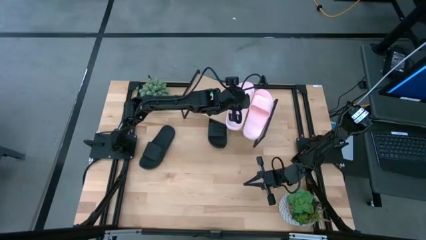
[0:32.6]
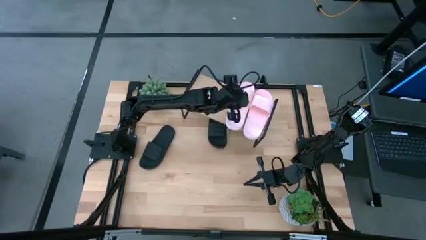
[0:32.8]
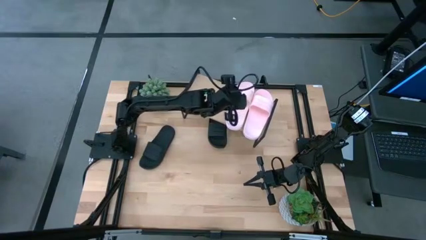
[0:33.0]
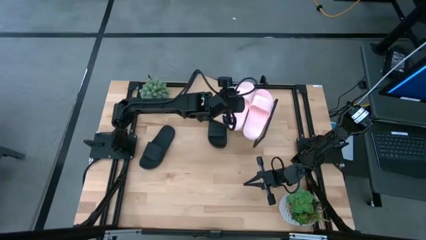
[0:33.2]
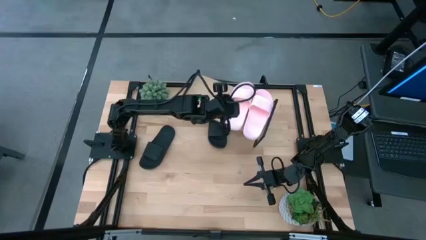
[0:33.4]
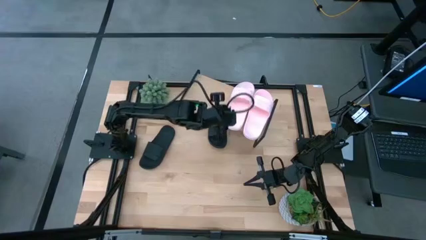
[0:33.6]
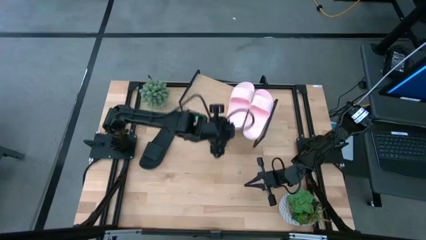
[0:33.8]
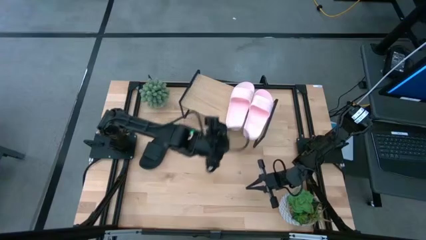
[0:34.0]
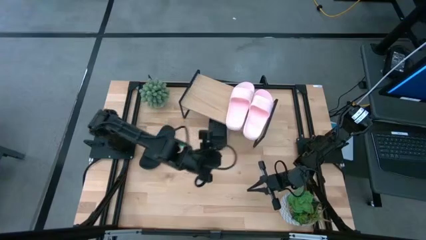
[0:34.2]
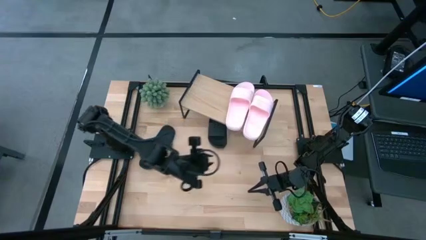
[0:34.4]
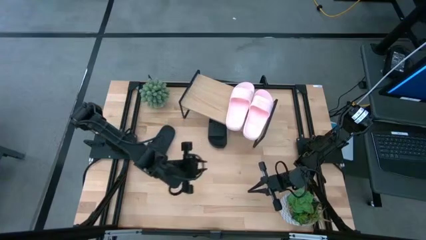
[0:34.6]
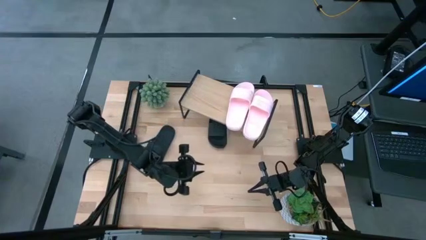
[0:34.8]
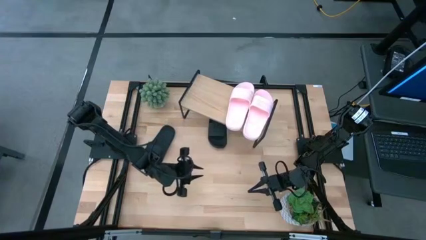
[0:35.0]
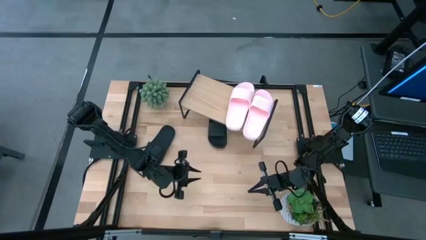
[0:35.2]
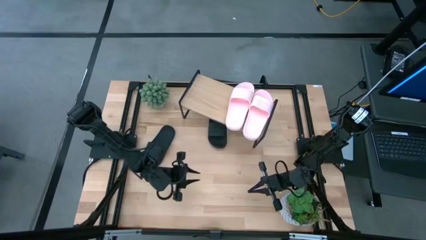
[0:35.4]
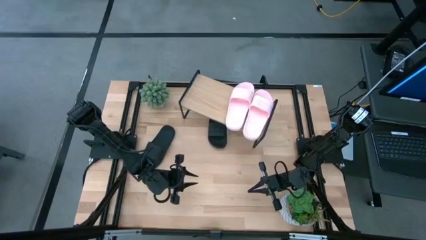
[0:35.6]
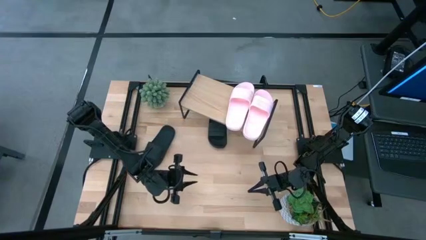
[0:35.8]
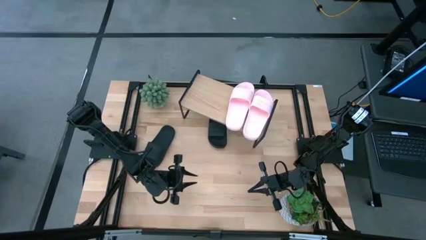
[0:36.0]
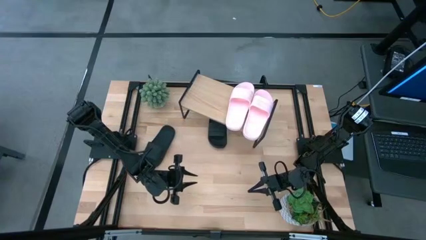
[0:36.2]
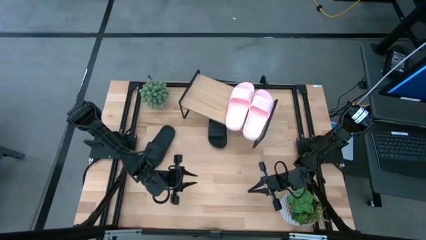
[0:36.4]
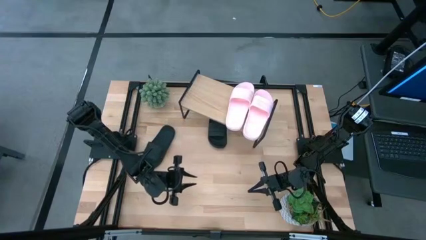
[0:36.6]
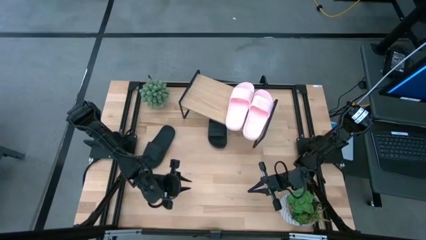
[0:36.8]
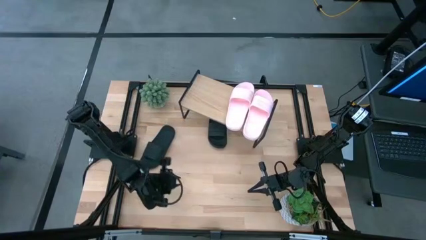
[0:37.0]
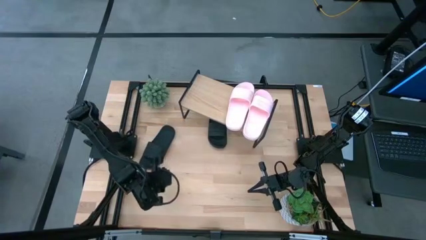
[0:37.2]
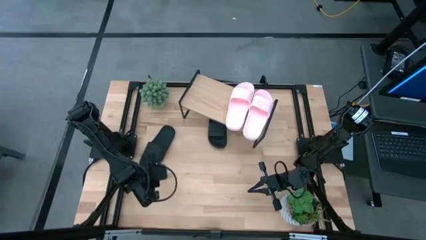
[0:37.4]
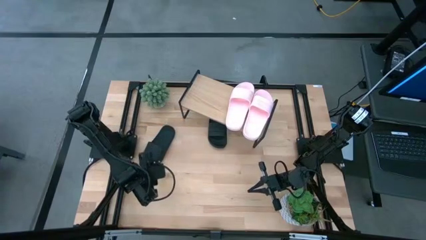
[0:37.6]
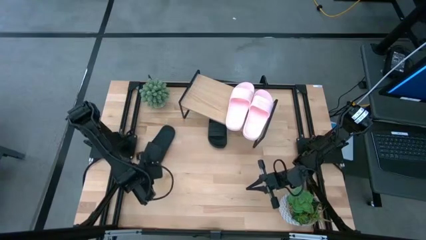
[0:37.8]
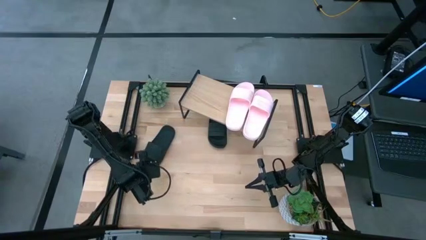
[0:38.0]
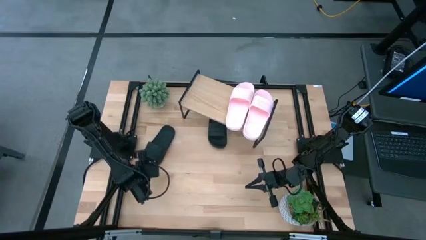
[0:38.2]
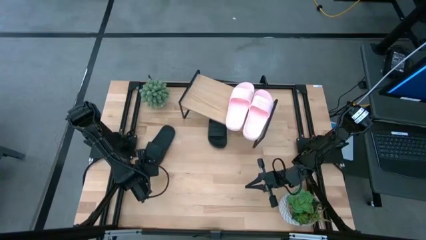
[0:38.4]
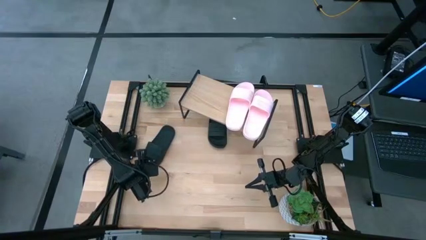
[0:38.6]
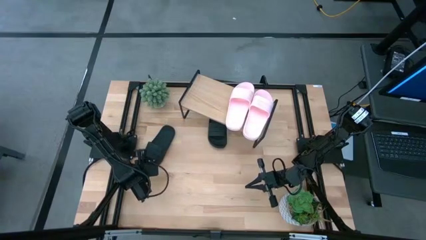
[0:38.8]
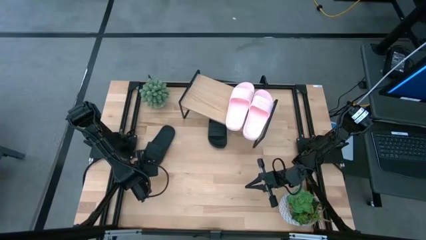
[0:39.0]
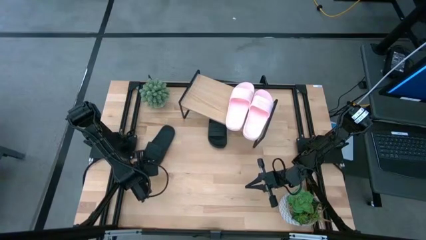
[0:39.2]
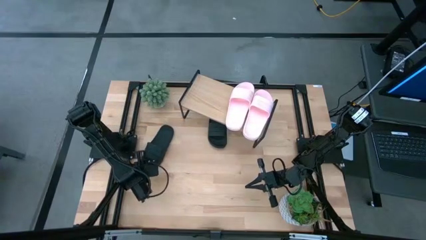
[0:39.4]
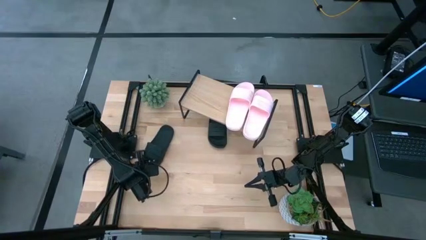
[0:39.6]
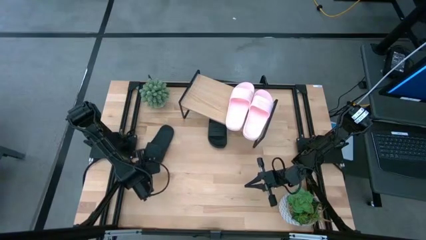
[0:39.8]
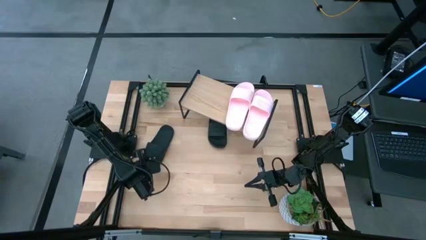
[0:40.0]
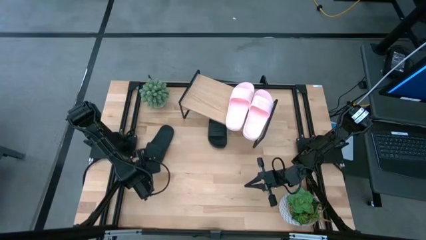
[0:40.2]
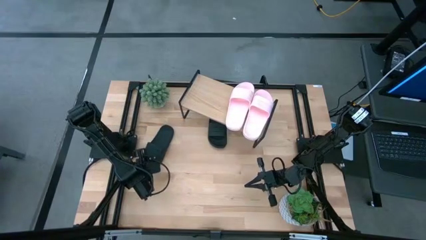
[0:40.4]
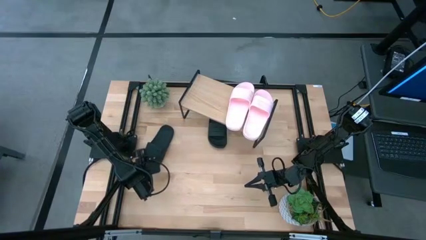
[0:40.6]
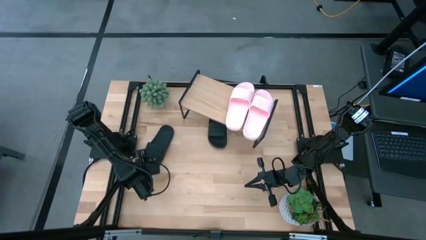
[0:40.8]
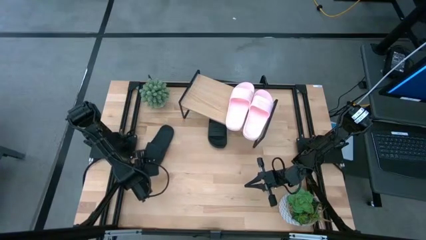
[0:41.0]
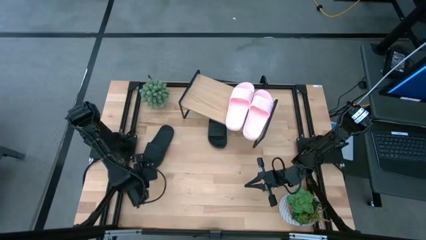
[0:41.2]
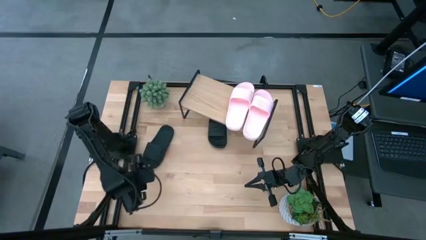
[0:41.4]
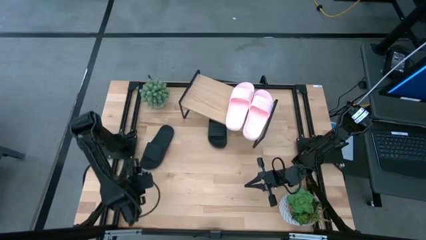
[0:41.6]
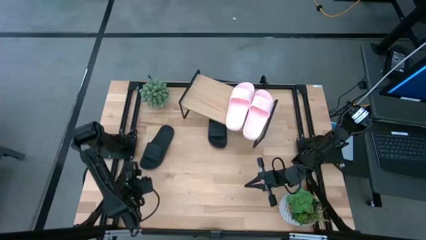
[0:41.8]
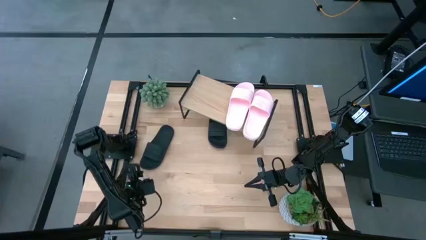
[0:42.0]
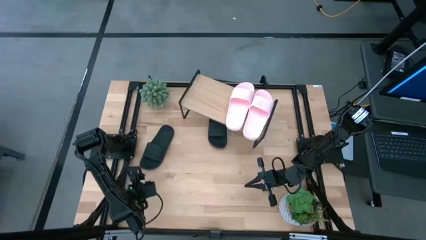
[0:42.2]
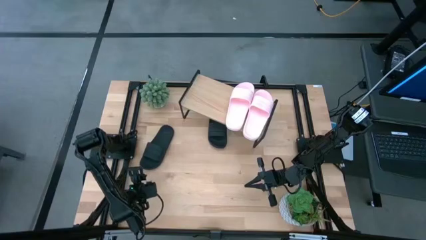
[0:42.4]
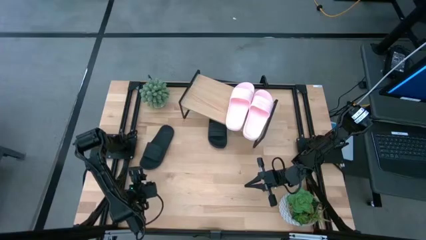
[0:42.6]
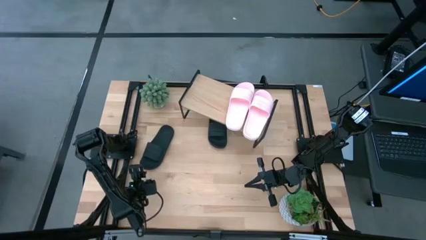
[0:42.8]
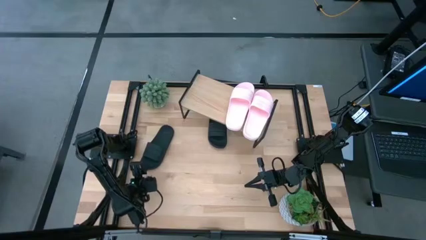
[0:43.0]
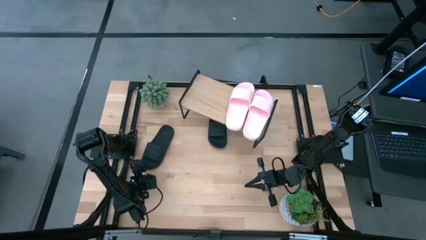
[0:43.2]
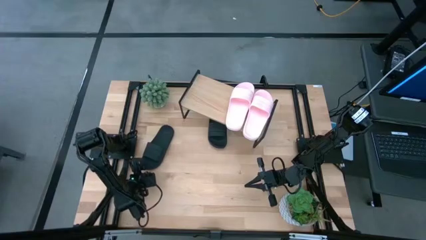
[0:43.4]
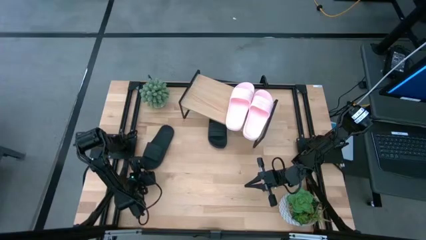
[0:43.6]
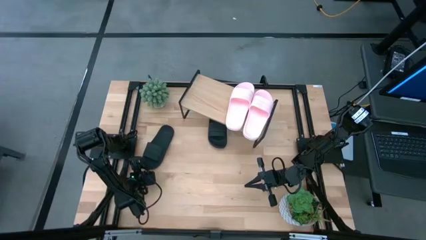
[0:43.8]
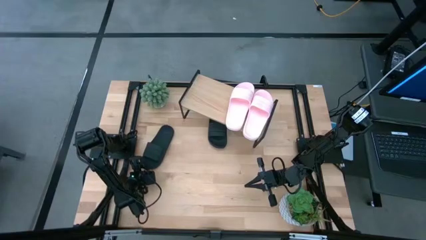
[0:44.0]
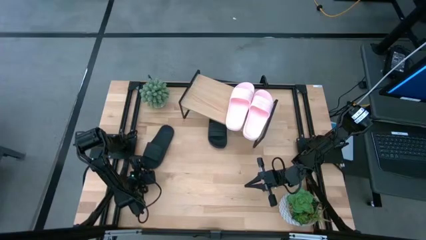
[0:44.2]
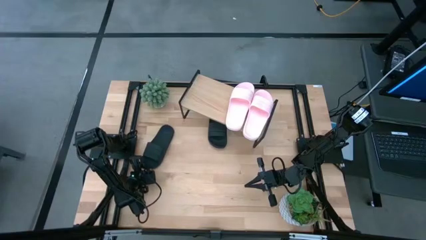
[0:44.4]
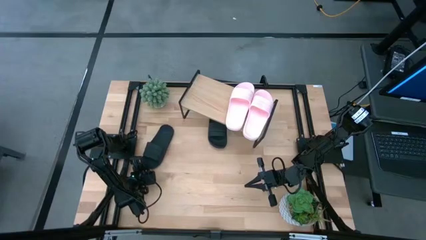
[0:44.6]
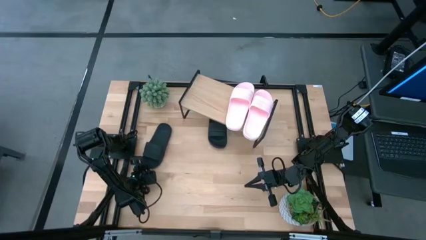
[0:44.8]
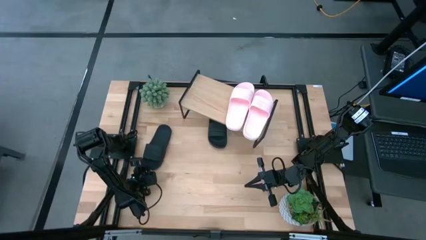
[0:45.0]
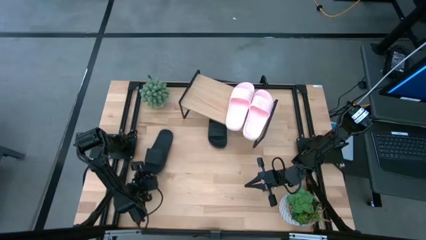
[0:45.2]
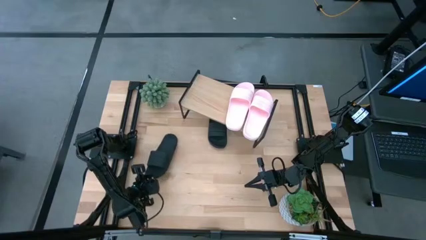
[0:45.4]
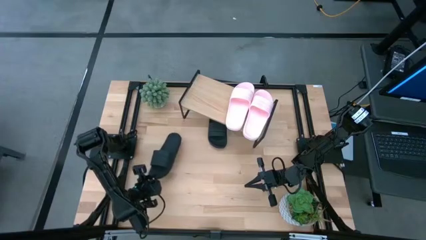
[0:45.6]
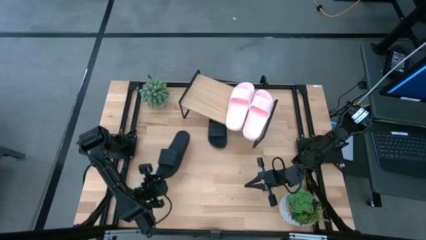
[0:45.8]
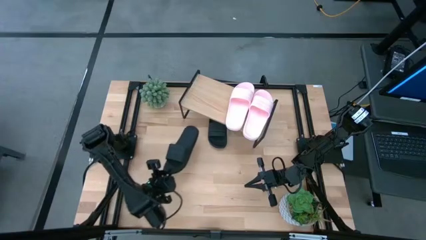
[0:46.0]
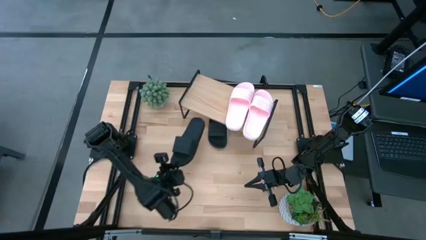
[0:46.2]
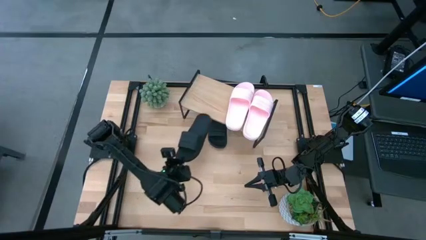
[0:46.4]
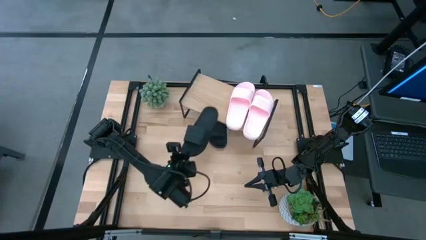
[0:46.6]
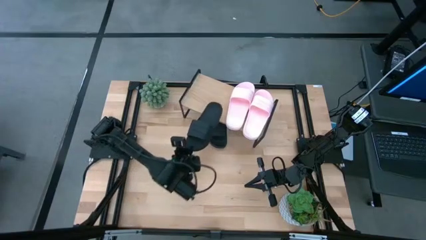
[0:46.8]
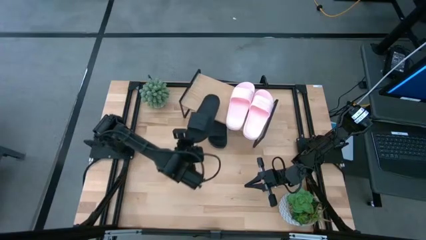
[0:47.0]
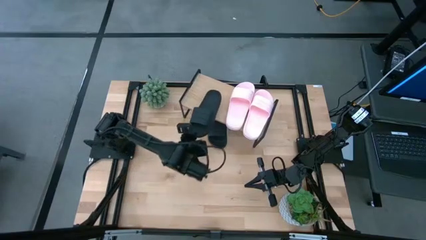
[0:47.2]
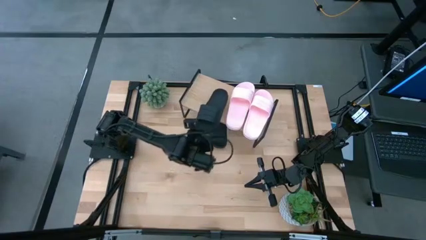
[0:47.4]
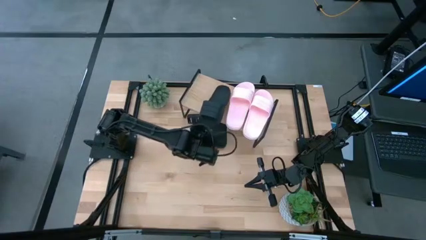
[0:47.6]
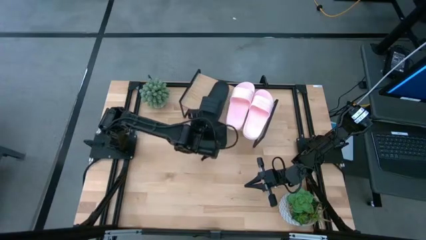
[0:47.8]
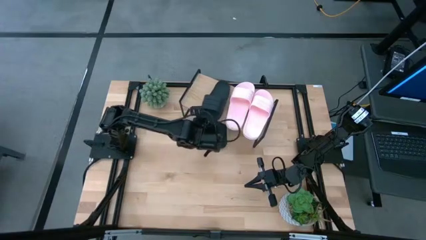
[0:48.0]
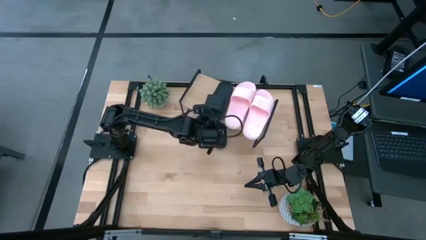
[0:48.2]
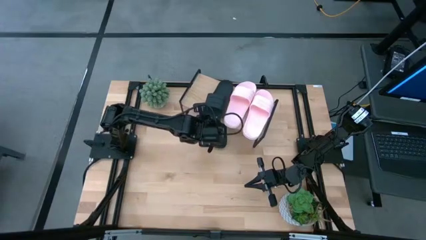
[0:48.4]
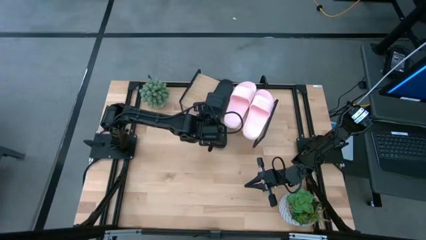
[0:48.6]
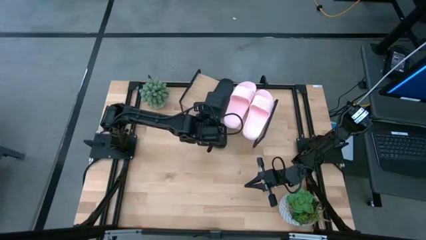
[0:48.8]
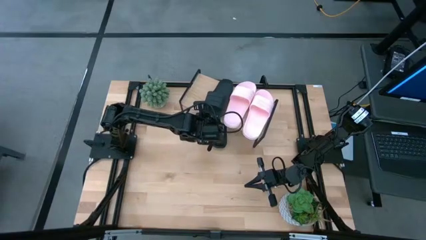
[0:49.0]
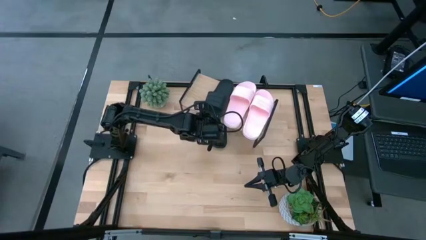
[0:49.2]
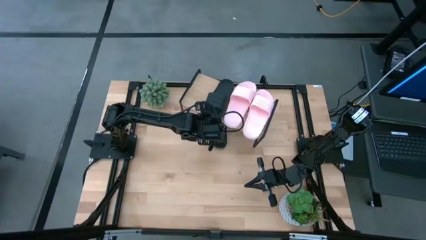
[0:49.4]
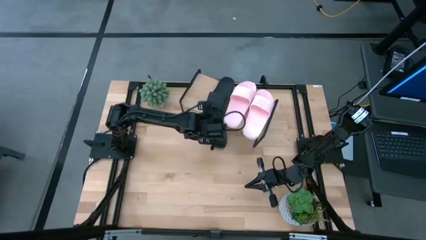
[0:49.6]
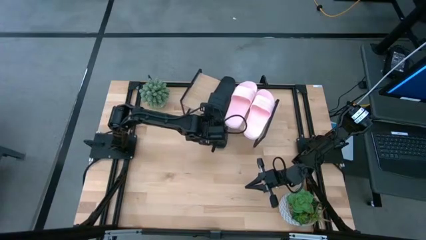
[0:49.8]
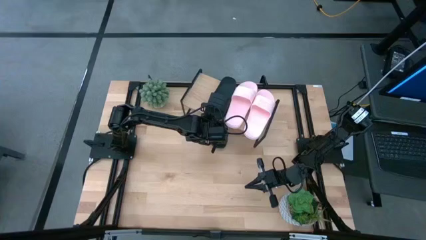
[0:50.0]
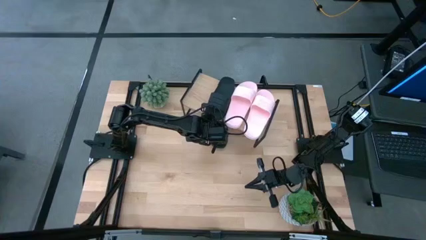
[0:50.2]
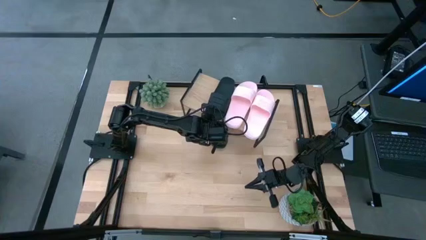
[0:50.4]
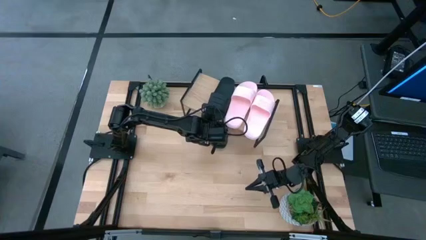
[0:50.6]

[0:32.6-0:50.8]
Task: Pick and place slides into the shelf
Put the left black slides on the shelf
